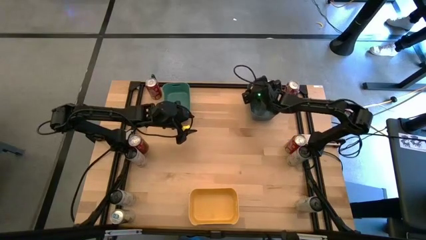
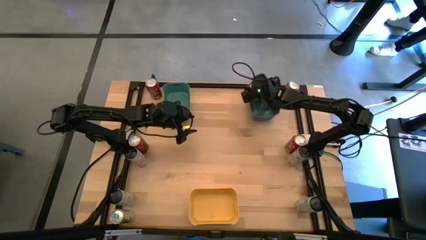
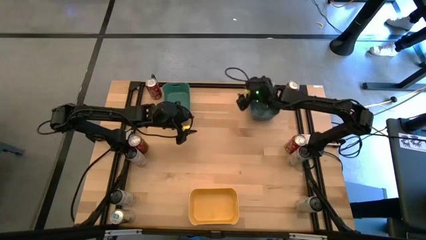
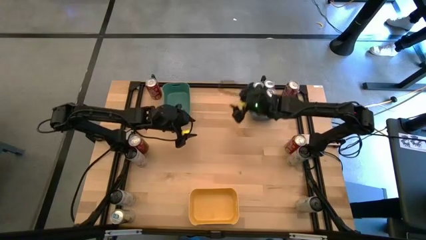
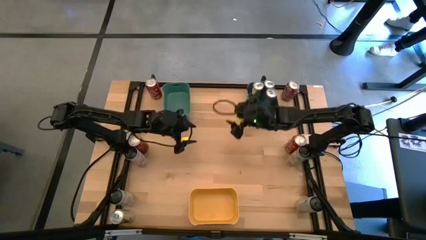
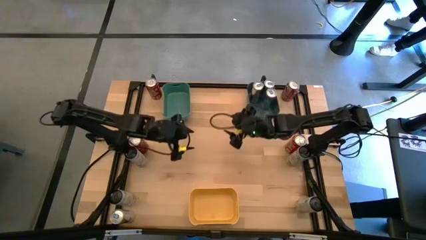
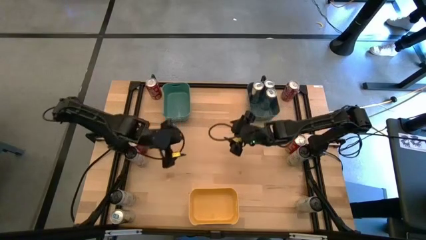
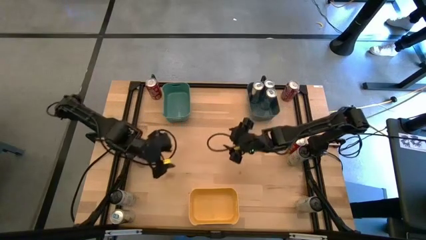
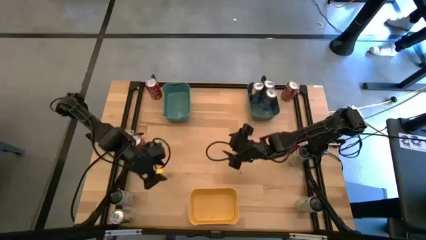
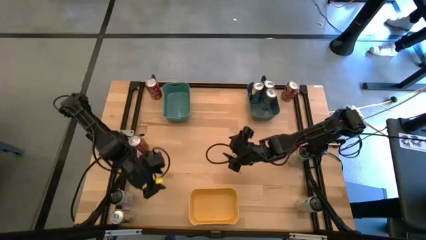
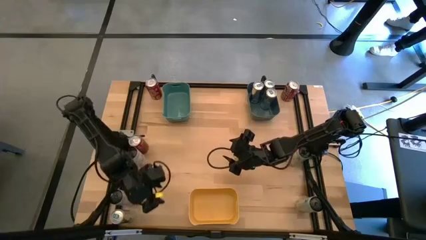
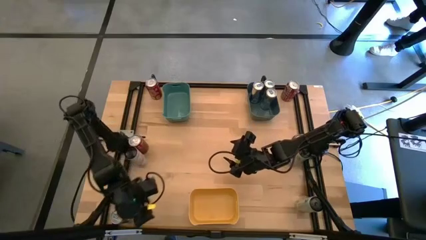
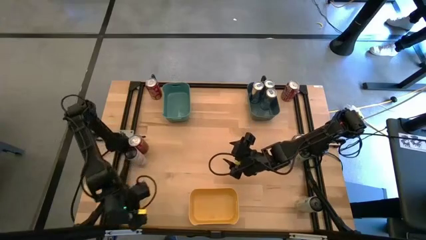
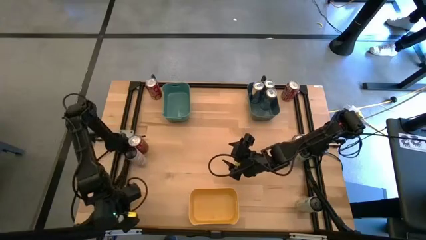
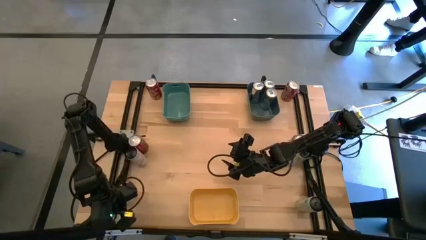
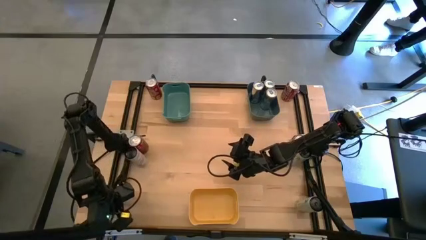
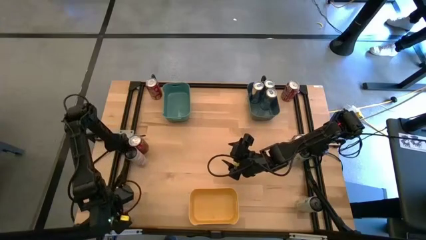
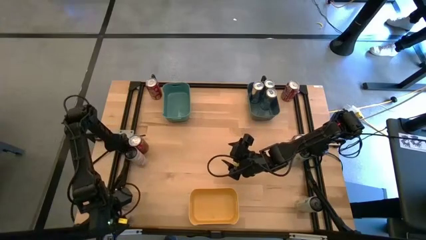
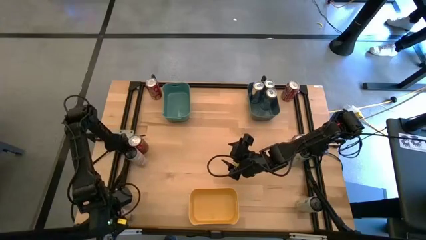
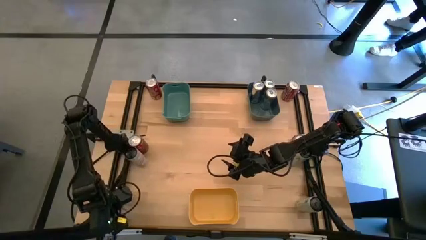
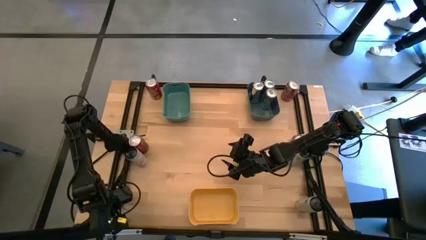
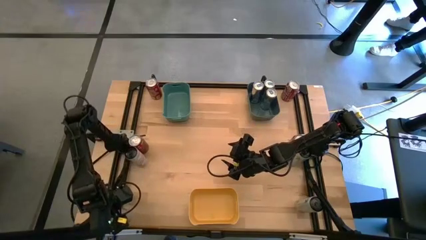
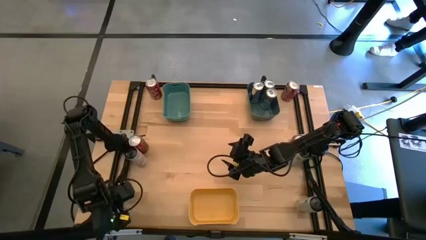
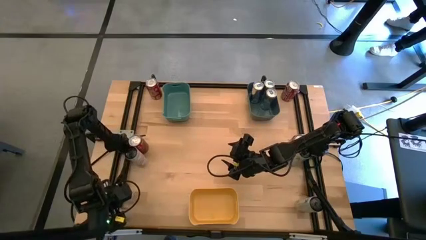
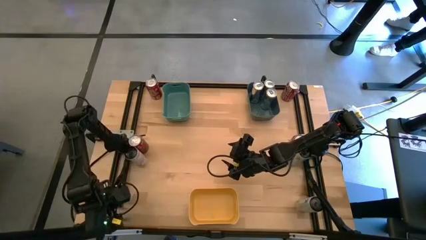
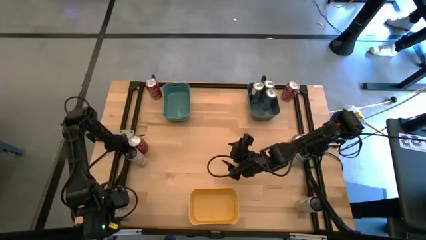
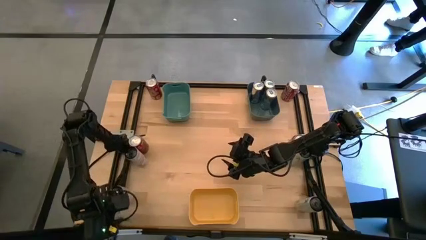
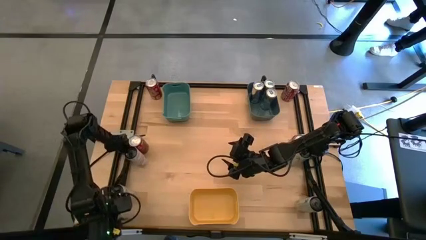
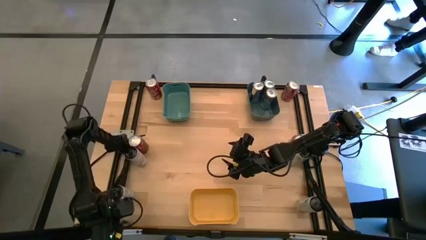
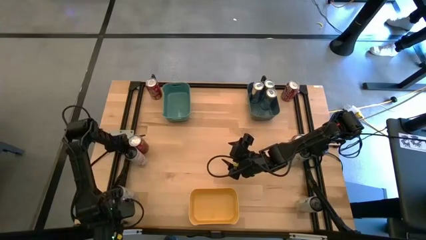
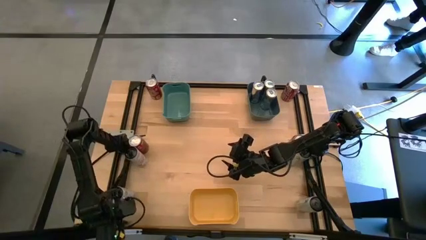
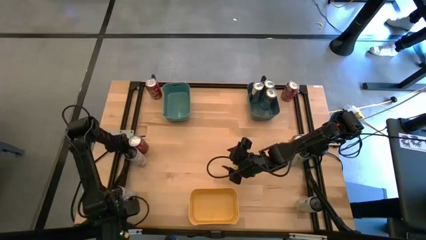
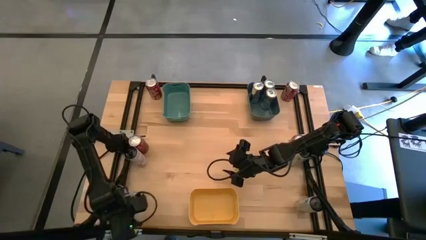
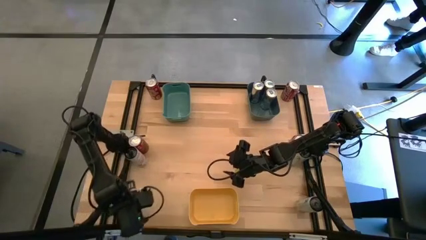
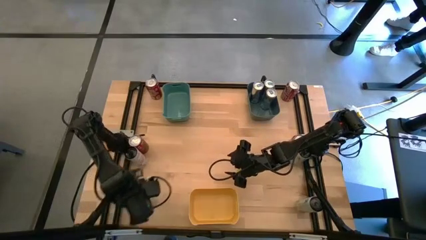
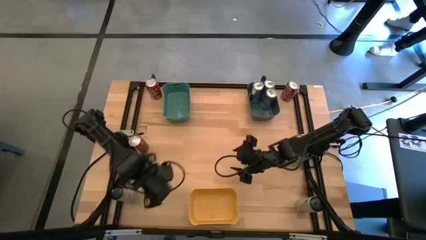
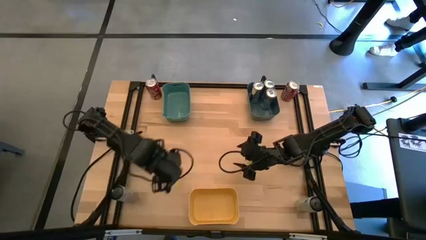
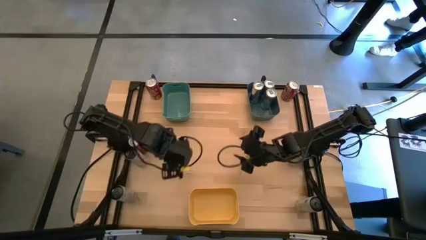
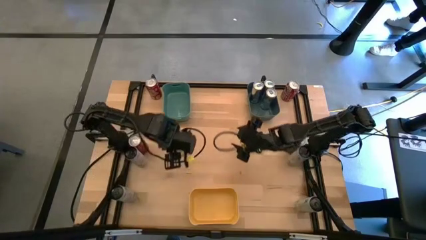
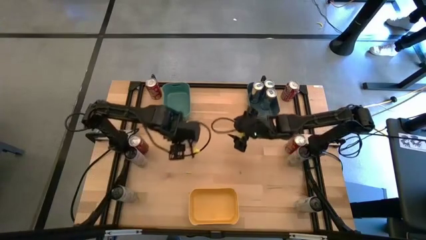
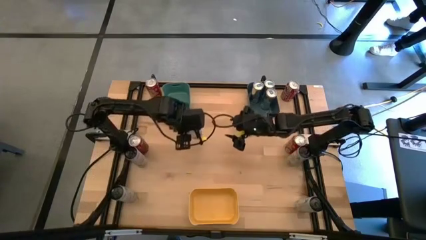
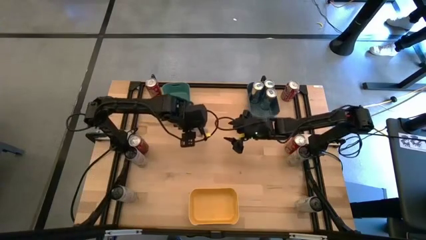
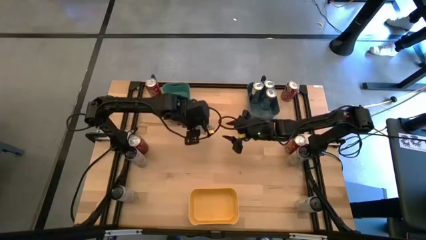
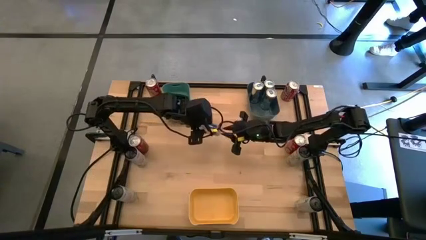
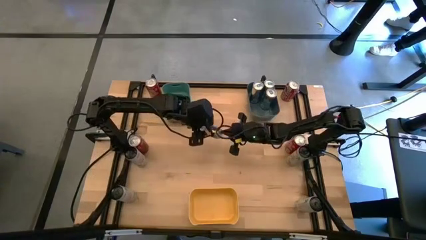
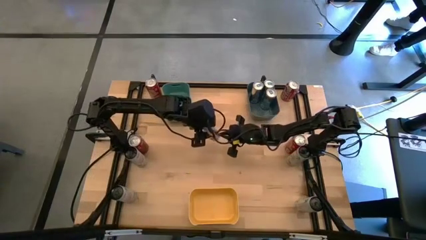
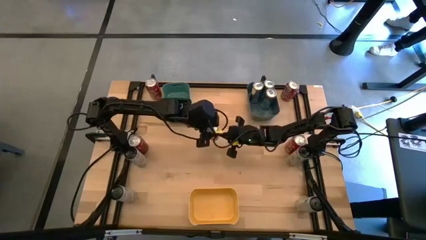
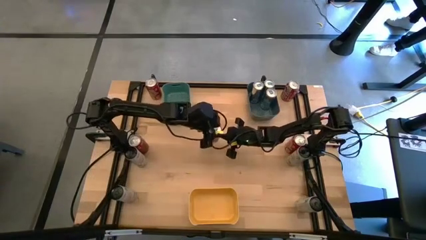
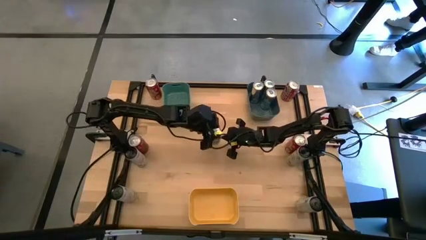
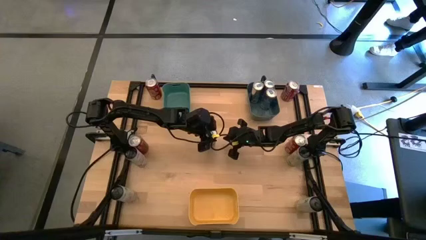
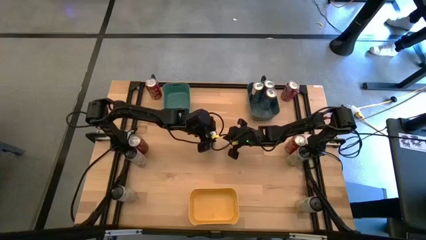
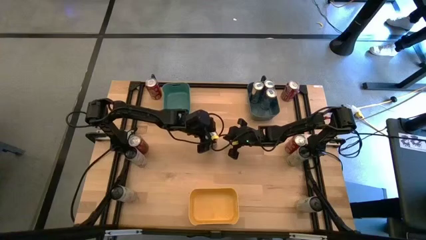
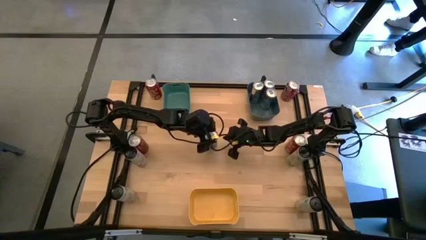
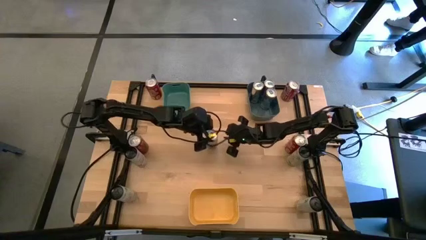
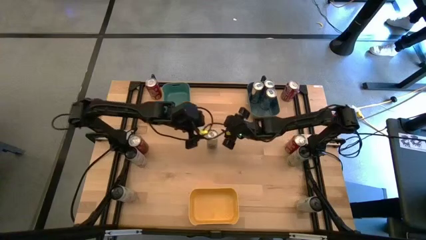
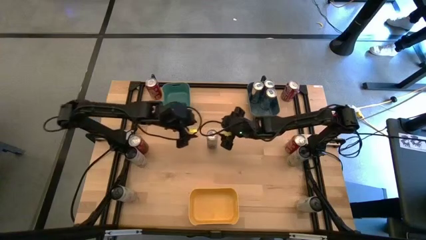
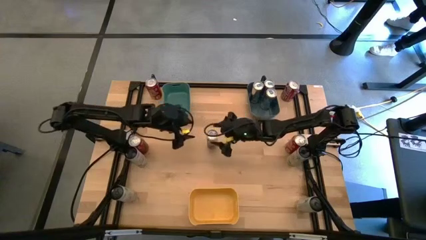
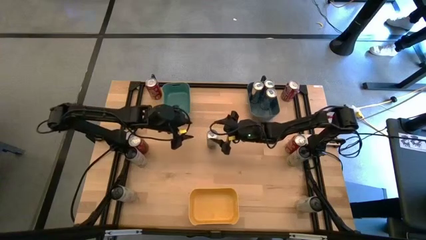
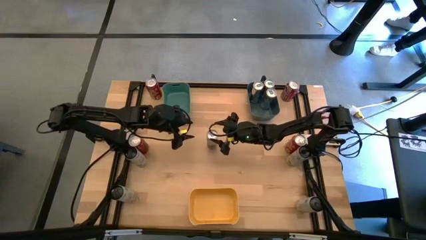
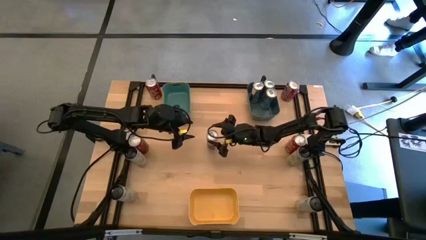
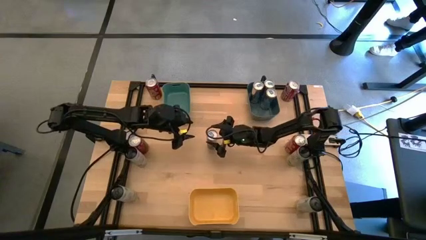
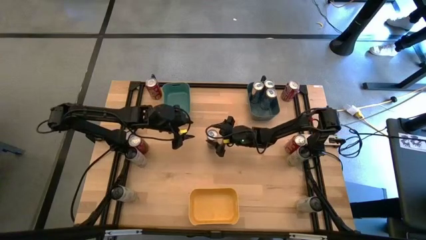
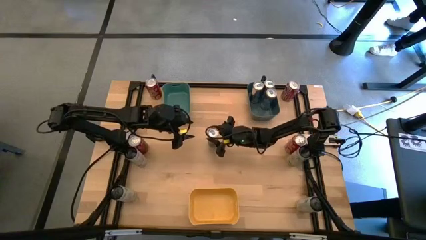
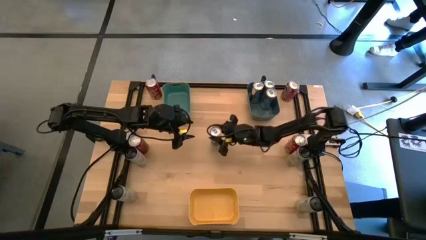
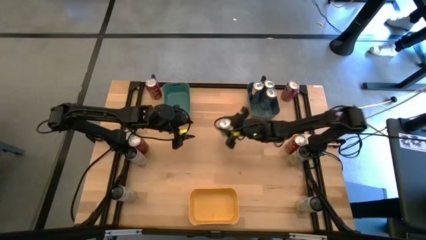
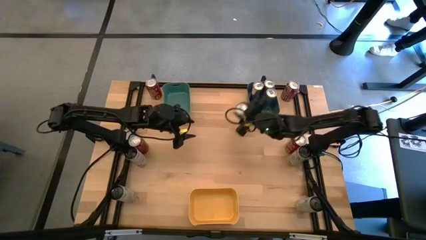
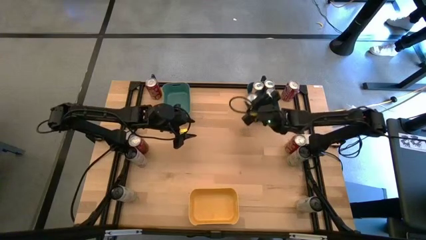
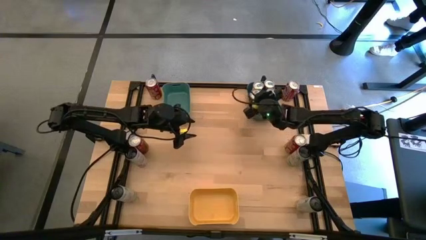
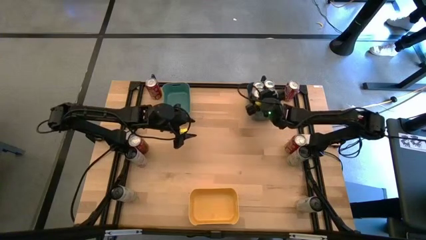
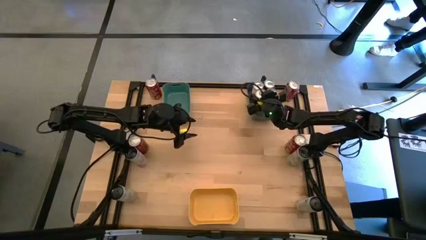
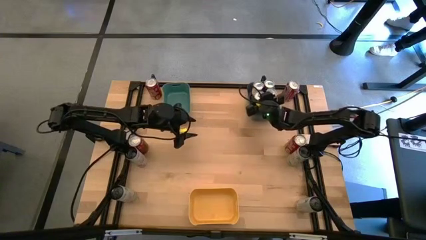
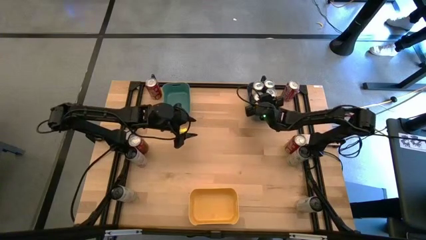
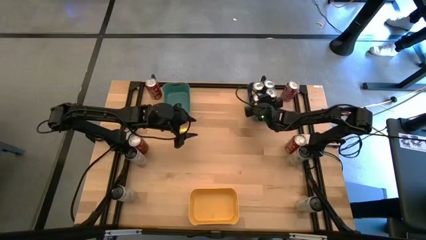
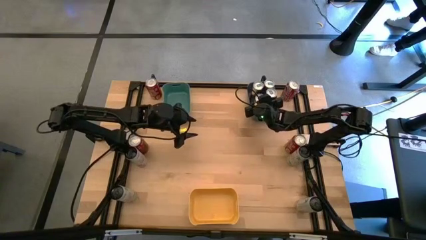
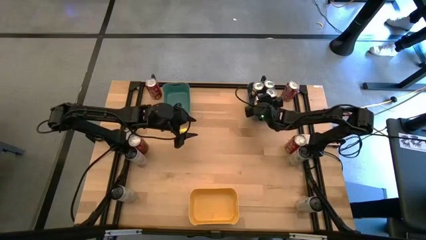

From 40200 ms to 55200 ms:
Task: Sort soda cans
Put the blue soda can into the blue bin
